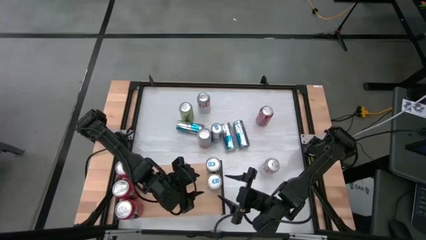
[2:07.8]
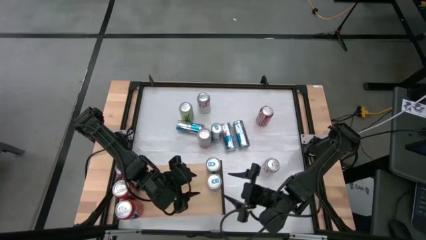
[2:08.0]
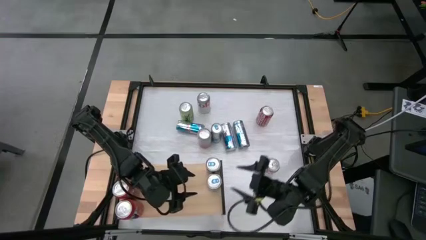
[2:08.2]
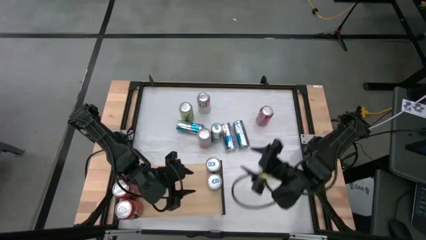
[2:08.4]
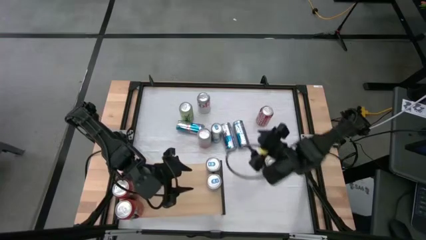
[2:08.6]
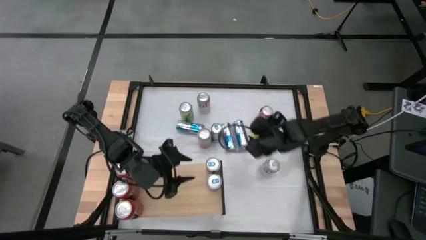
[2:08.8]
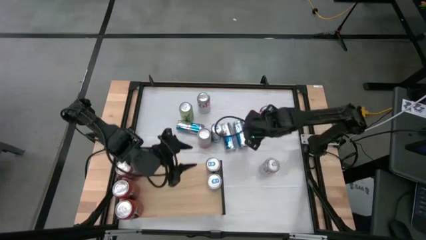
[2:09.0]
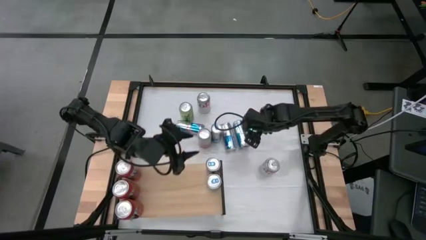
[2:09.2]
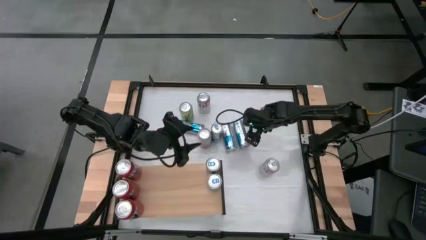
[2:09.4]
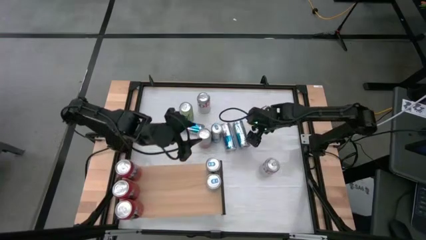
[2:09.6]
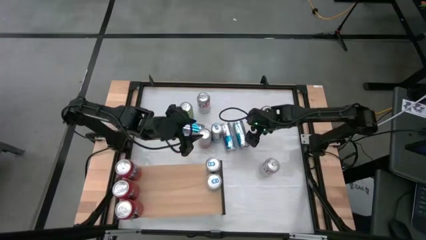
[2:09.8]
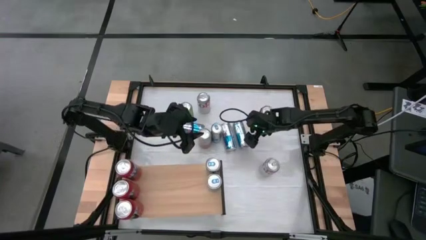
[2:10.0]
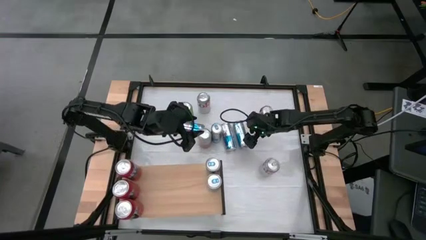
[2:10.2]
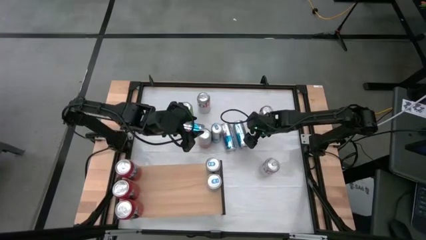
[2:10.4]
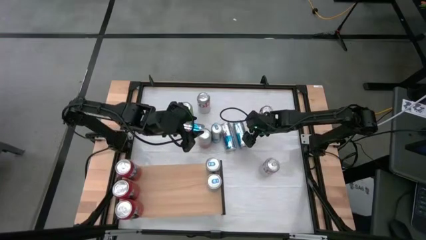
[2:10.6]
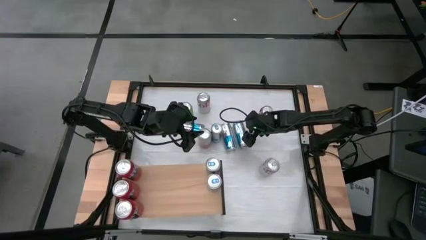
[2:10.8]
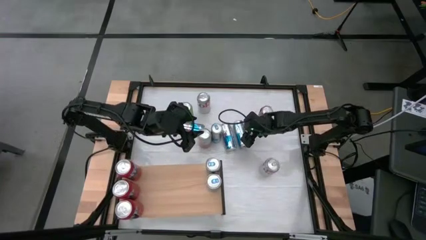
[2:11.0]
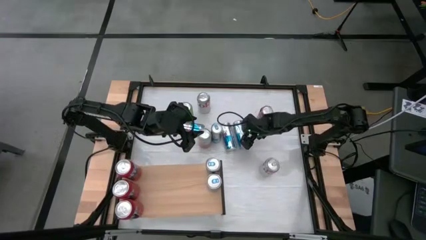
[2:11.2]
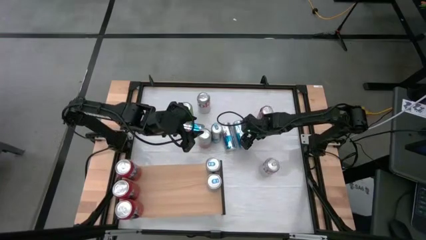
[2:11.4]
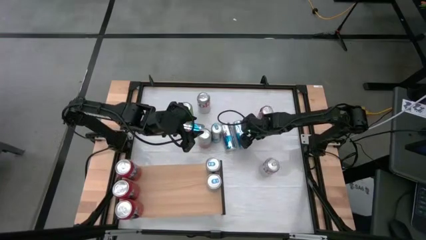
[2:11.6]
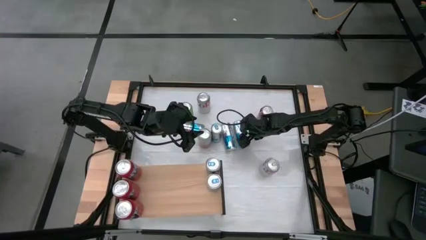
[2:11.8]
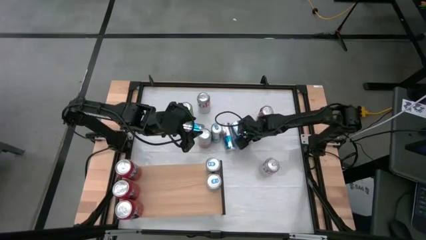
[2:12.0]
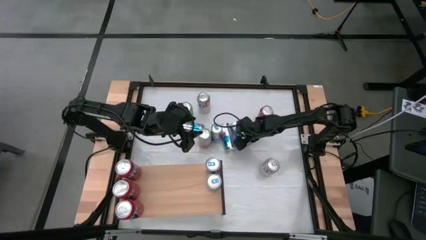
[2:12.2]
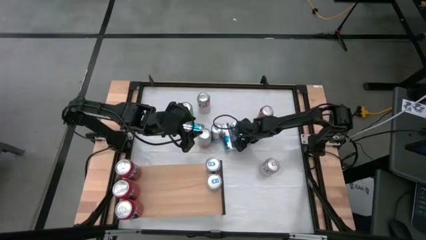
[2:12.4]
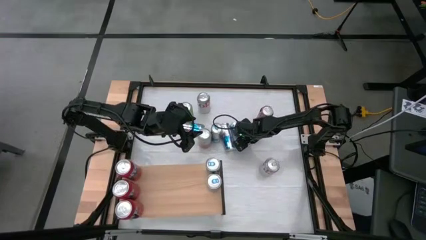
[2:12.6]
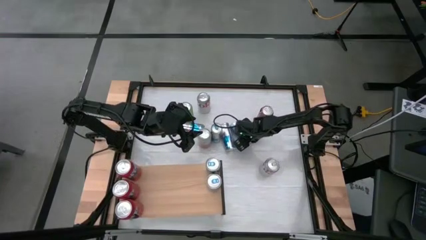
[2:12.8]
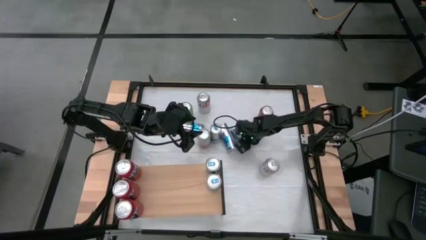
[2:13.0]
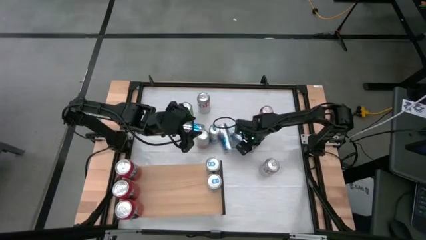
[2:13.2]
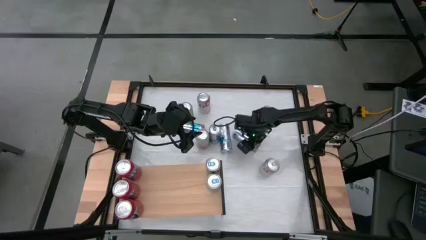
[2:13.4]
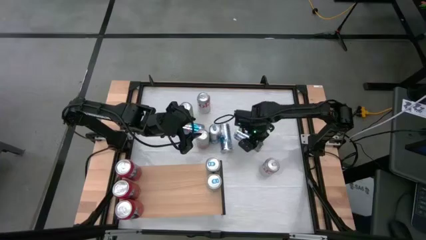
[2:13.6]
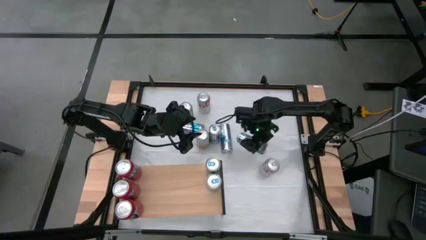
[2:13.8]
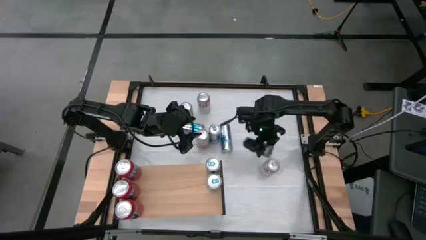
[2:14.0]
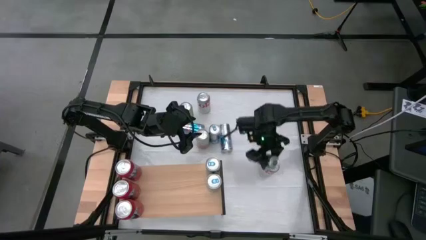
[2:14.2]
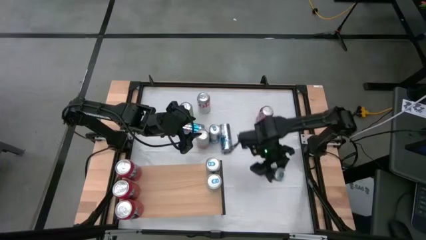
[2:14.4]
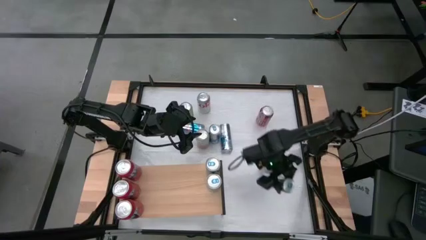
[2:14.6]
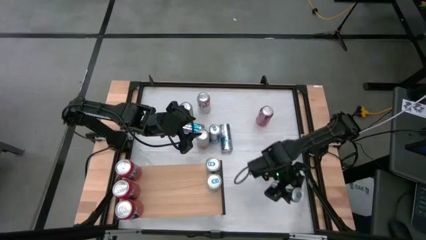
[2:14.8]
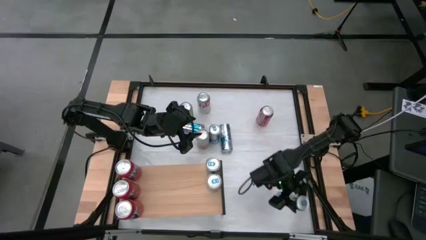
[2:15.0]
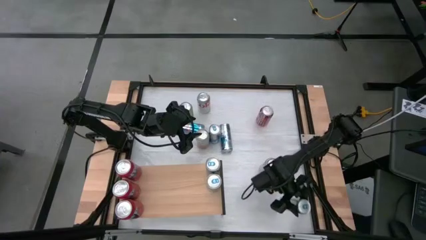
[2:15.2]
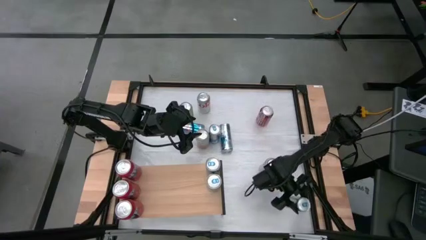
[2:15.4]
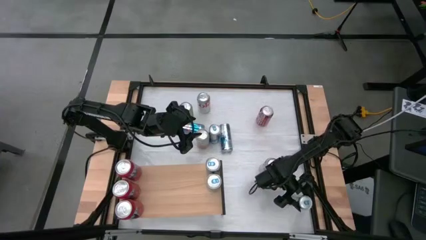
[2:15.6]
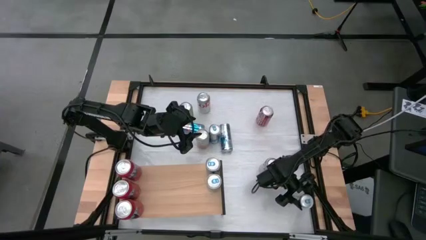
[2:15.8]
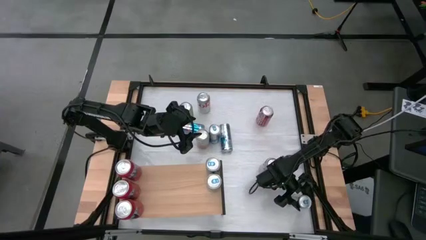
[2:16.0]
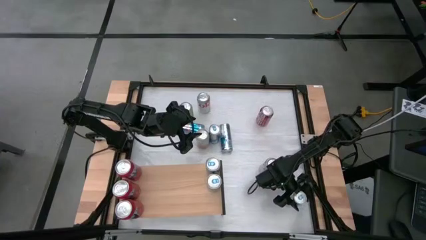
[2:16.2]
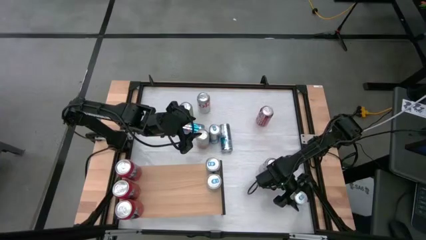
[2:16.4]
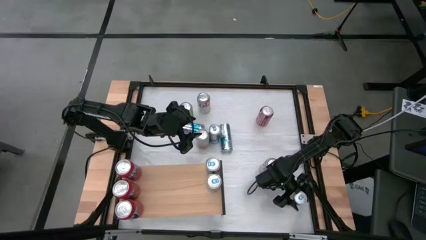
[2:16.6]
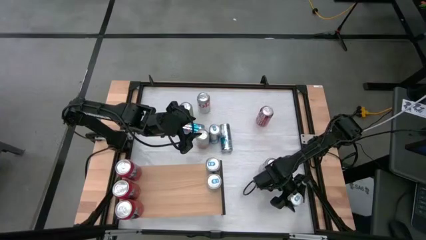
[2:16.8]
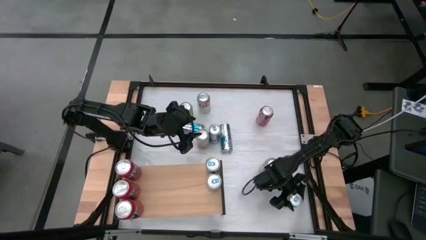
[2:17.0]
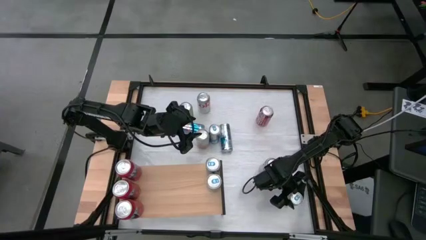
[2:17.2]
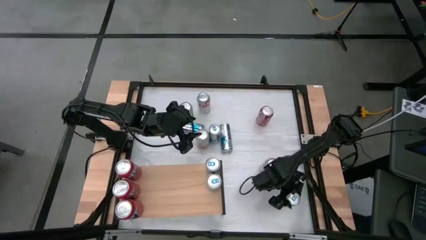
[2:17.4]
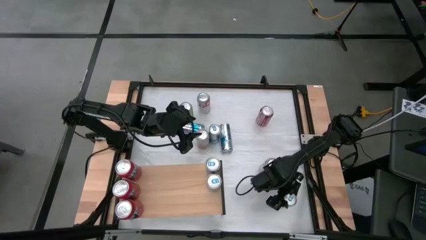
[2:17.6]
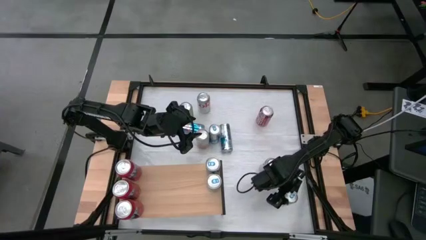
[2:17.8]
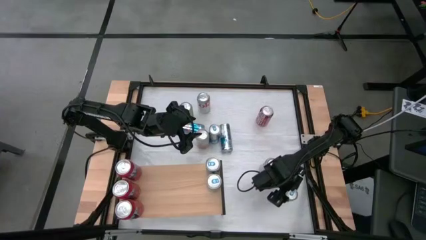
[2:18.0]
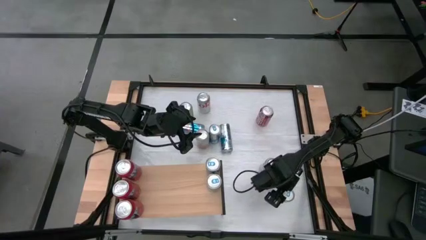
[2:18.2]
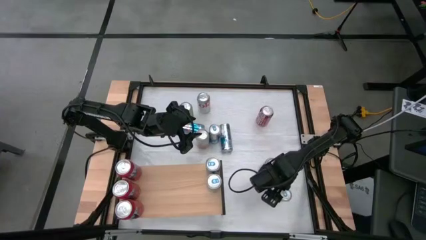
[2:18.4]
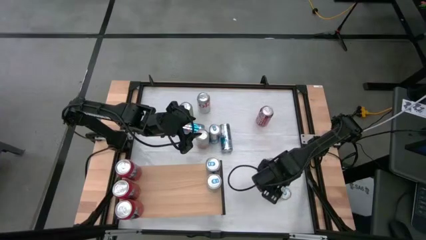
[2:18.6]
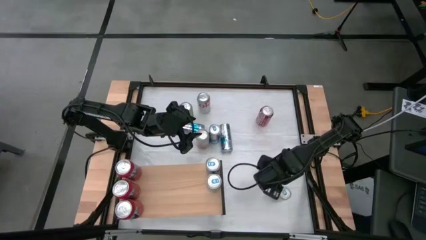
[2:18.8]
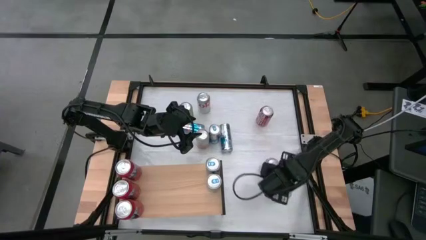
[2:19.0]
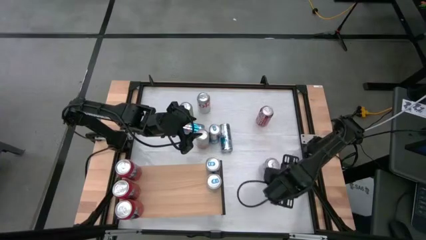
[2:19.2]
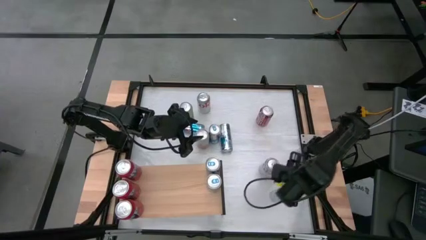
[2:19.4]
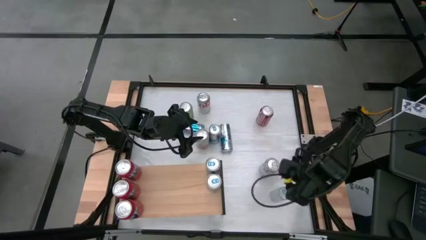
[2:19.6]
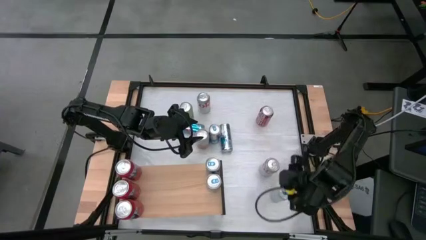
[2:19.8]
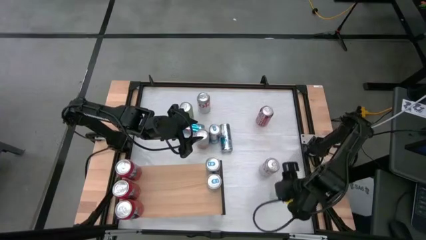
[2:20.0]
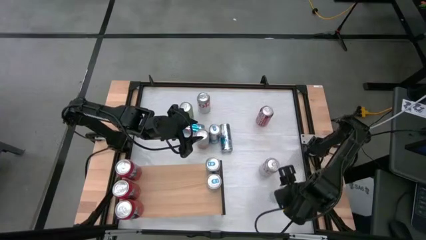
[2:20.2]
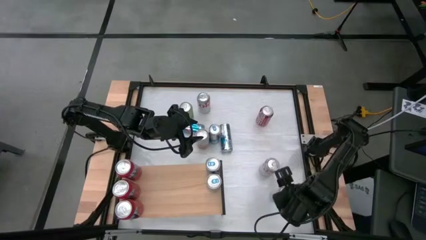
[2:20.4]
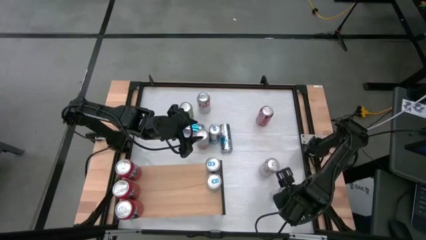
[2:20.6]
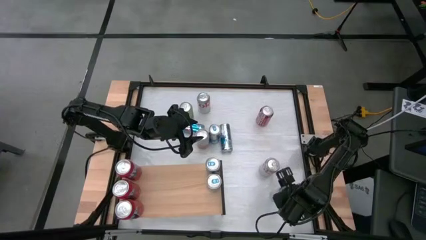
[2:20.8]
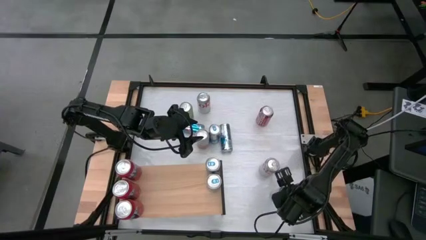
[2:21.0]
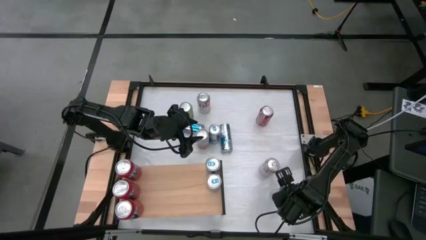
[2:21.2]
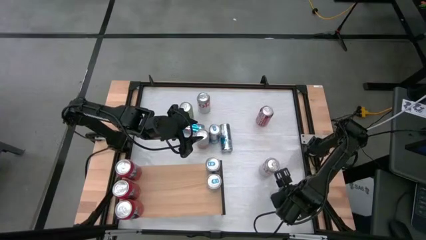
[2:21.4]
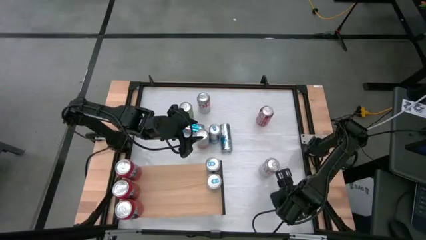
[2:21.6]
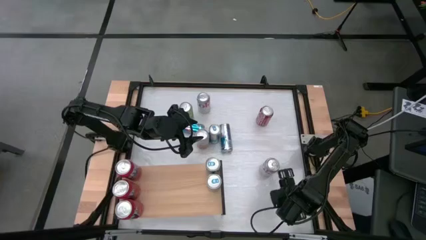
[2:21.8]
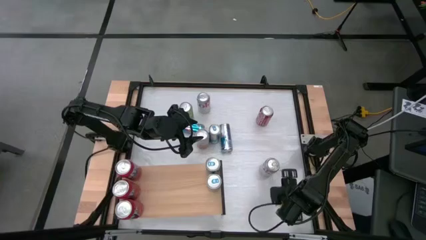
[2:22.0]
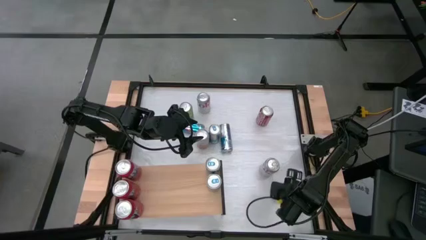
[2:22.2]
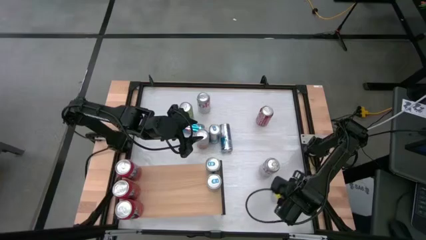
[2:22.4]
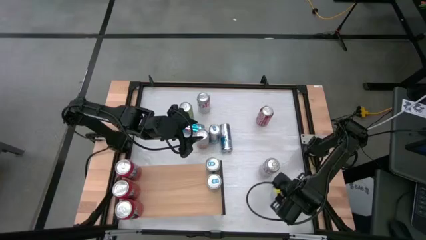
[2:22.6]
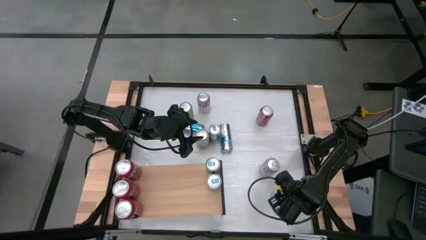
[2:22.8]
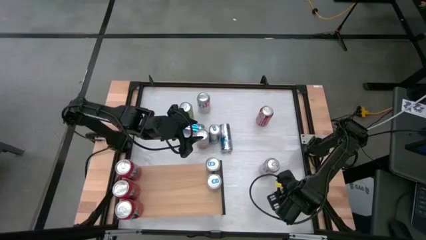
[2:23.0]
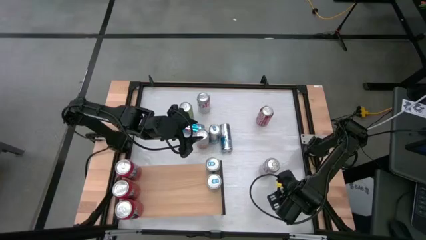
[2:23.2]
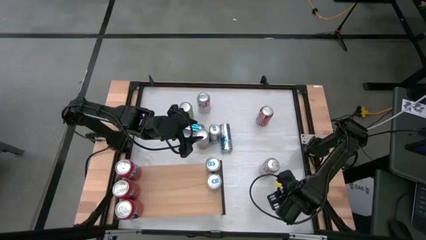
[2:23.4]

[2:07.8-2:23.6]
Task: Place canned beverage on shelf
Put the blue soda can on the shelf aligned with the blue soda cans
